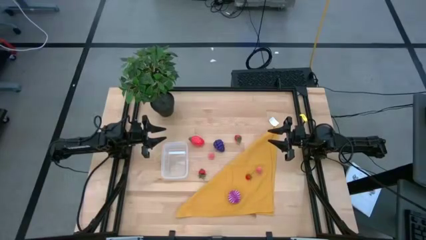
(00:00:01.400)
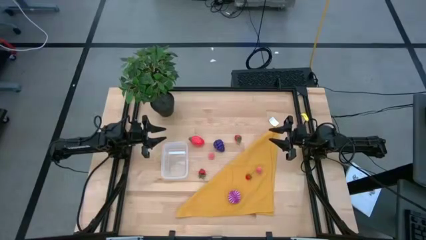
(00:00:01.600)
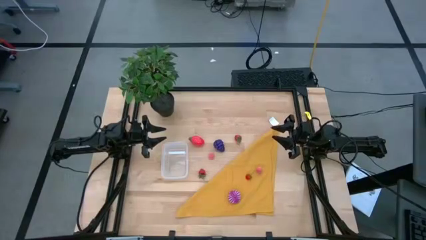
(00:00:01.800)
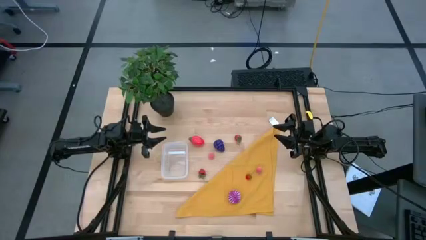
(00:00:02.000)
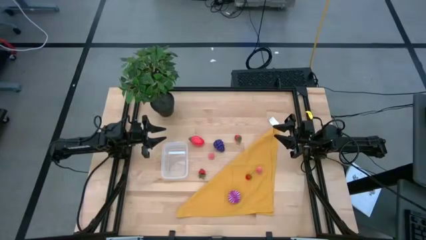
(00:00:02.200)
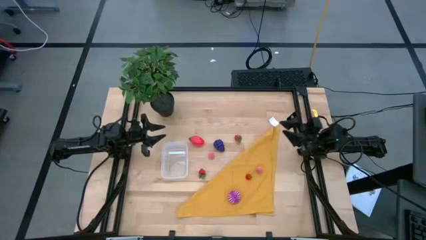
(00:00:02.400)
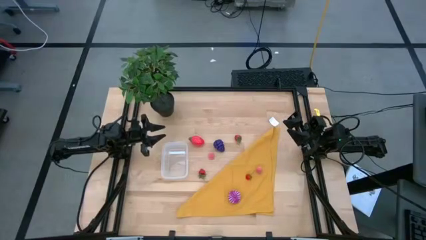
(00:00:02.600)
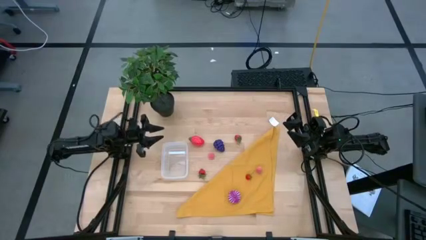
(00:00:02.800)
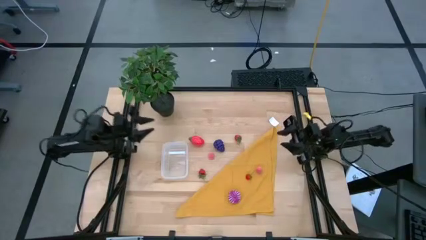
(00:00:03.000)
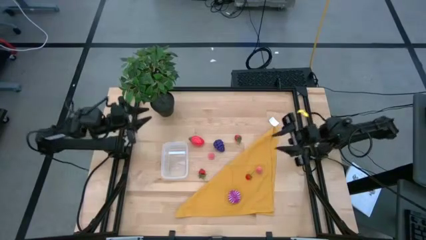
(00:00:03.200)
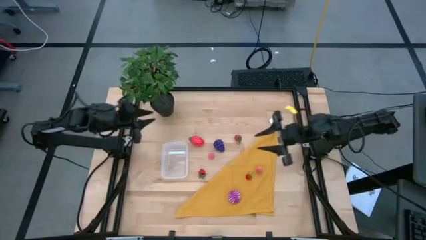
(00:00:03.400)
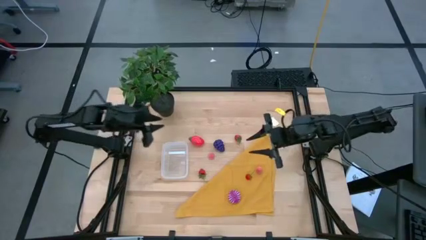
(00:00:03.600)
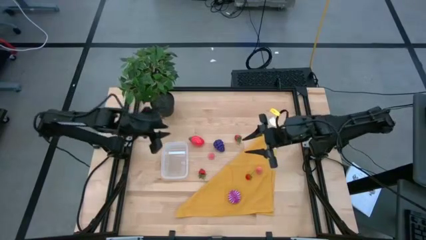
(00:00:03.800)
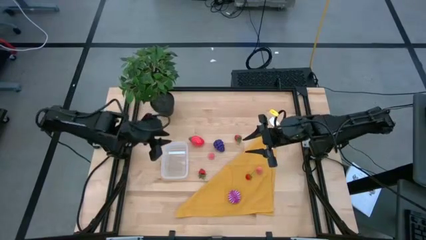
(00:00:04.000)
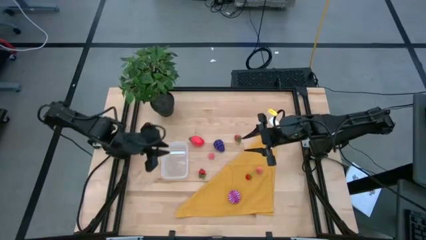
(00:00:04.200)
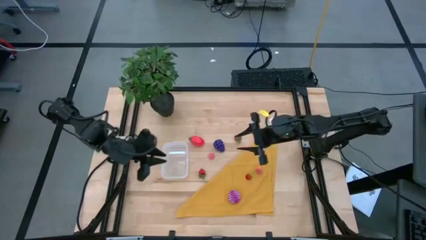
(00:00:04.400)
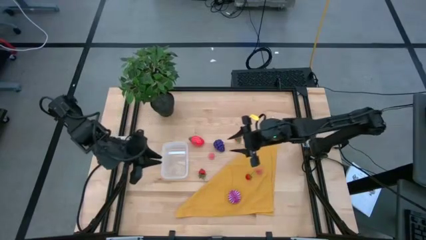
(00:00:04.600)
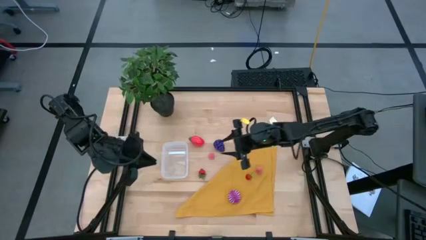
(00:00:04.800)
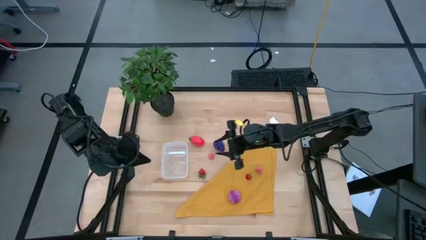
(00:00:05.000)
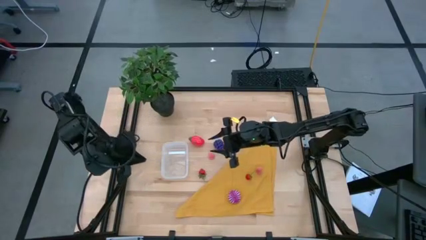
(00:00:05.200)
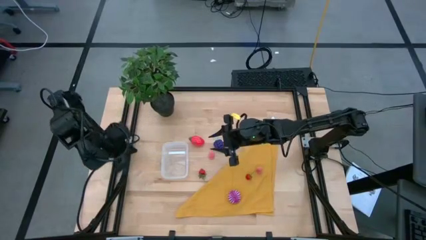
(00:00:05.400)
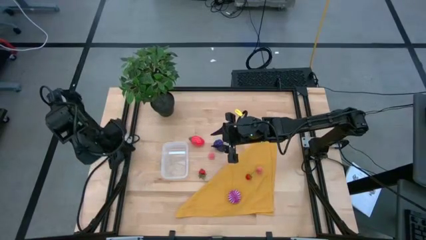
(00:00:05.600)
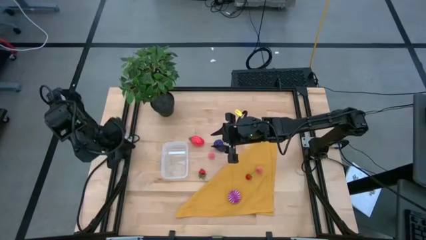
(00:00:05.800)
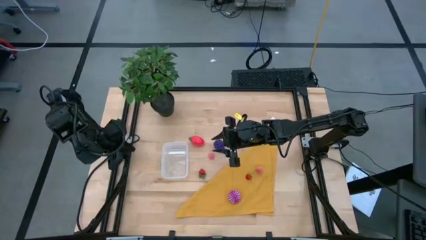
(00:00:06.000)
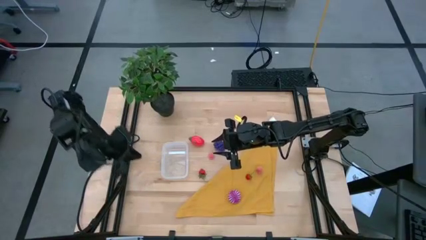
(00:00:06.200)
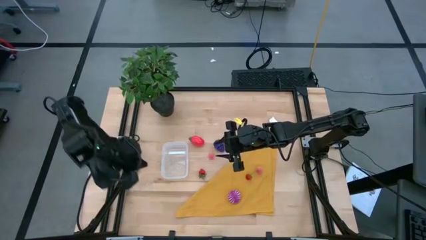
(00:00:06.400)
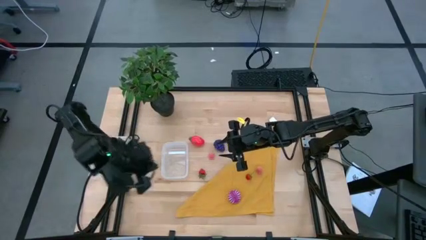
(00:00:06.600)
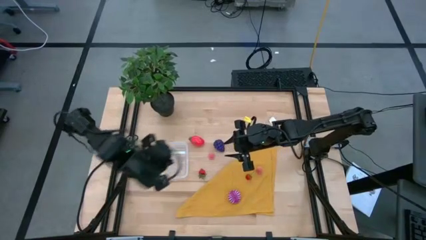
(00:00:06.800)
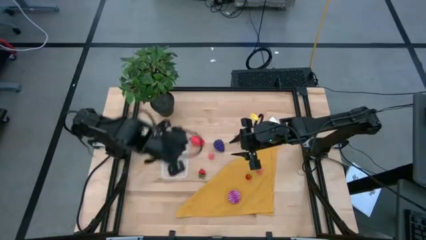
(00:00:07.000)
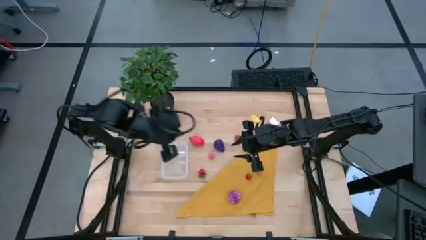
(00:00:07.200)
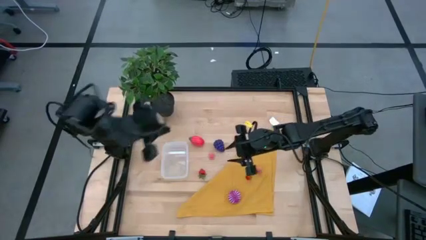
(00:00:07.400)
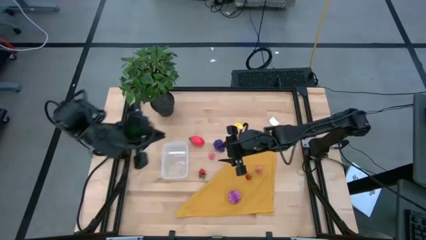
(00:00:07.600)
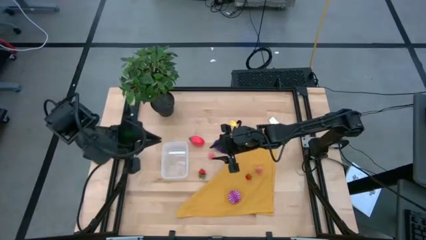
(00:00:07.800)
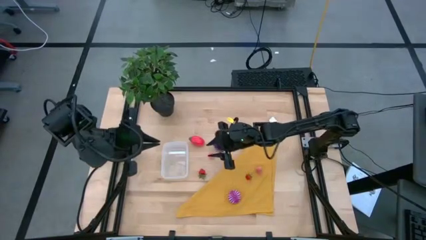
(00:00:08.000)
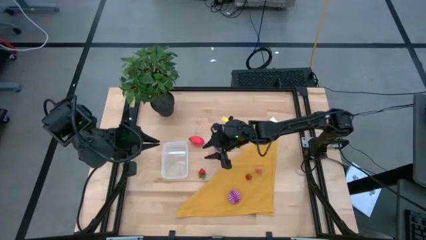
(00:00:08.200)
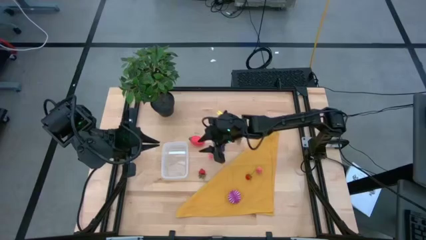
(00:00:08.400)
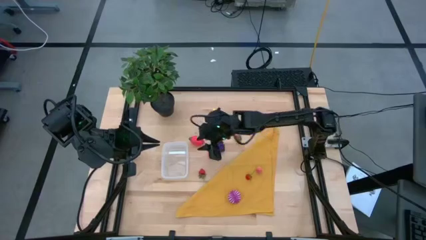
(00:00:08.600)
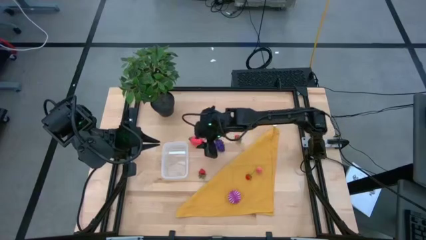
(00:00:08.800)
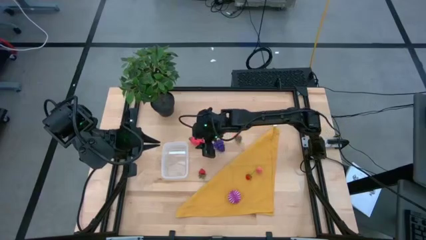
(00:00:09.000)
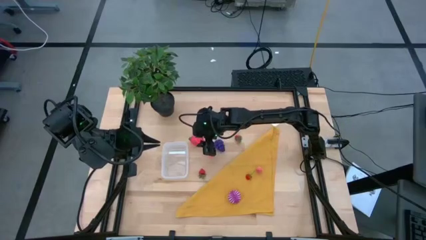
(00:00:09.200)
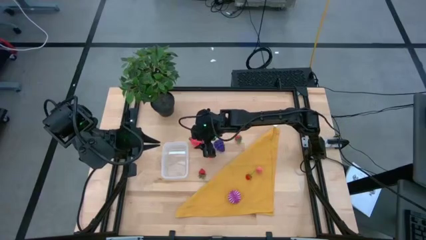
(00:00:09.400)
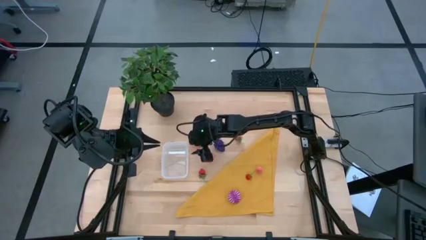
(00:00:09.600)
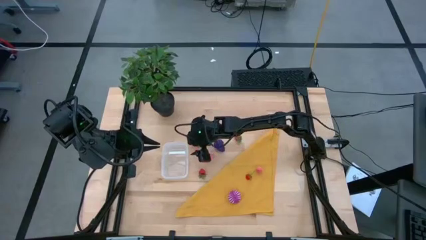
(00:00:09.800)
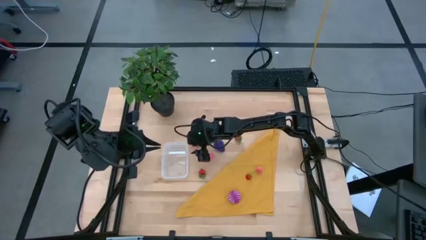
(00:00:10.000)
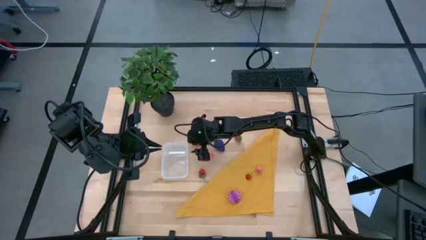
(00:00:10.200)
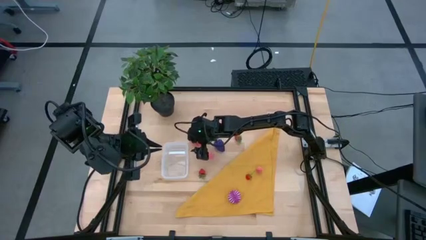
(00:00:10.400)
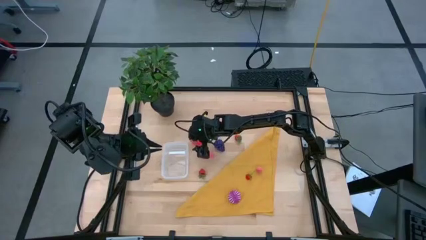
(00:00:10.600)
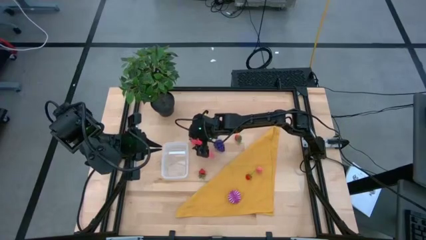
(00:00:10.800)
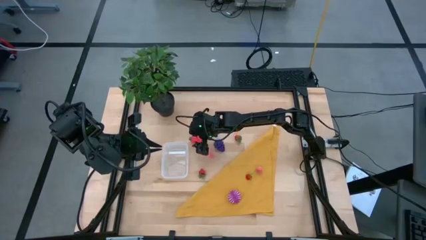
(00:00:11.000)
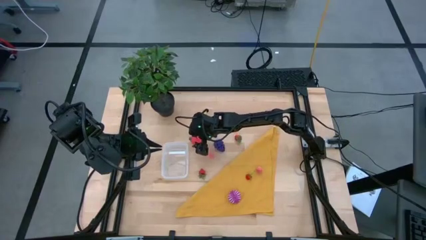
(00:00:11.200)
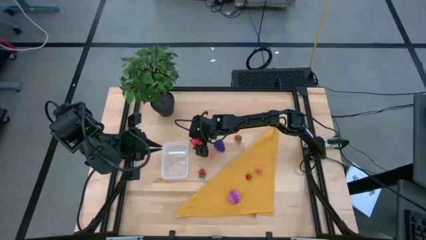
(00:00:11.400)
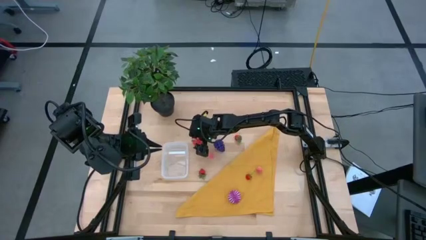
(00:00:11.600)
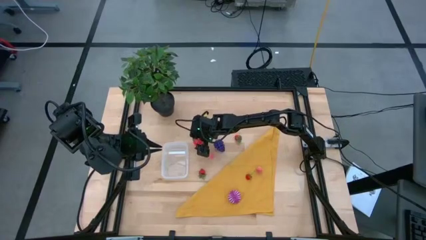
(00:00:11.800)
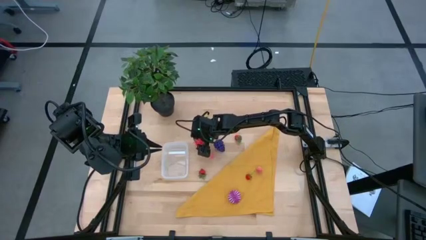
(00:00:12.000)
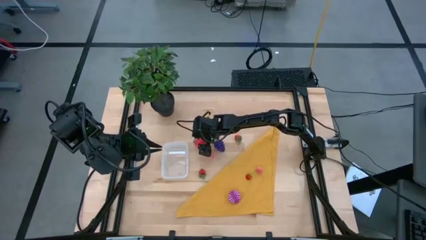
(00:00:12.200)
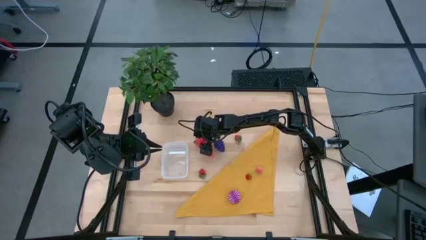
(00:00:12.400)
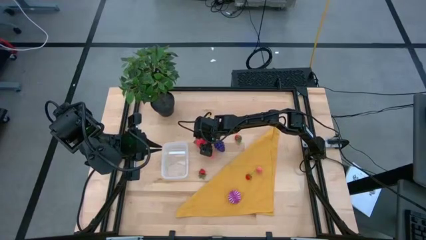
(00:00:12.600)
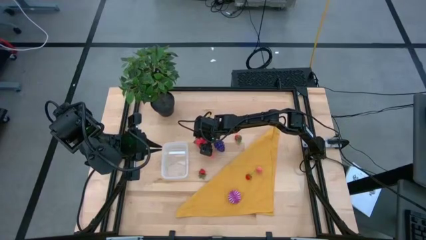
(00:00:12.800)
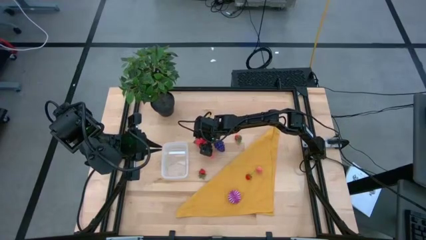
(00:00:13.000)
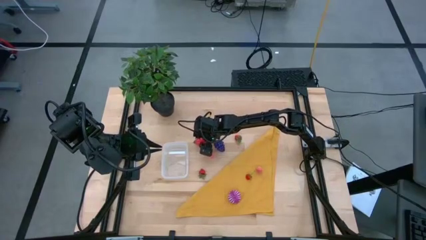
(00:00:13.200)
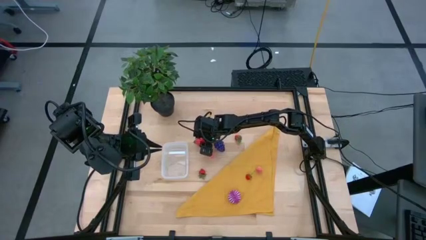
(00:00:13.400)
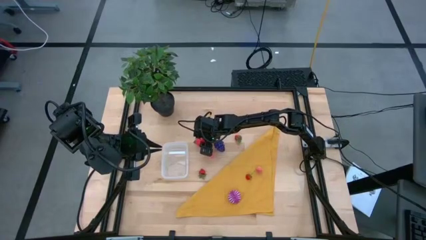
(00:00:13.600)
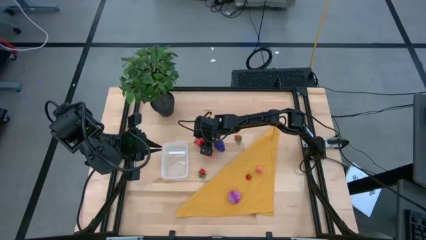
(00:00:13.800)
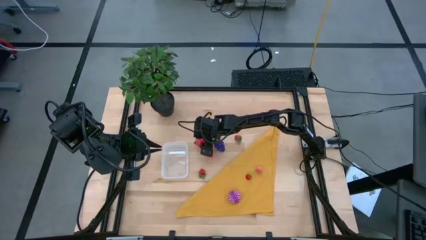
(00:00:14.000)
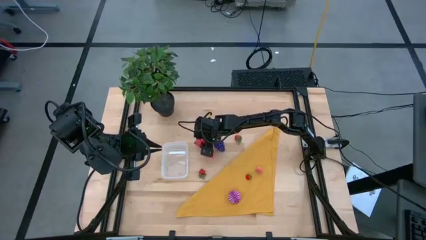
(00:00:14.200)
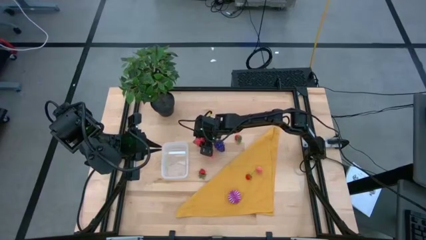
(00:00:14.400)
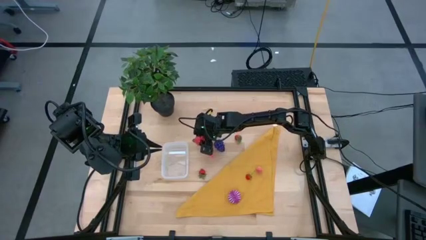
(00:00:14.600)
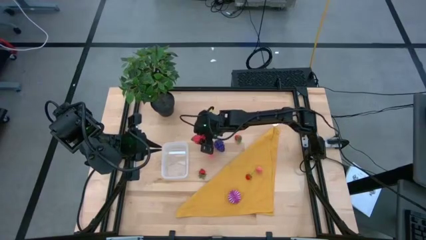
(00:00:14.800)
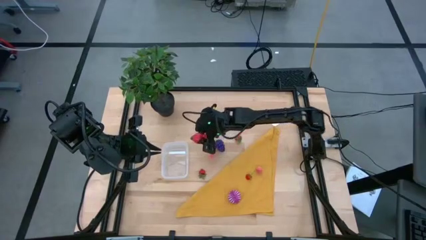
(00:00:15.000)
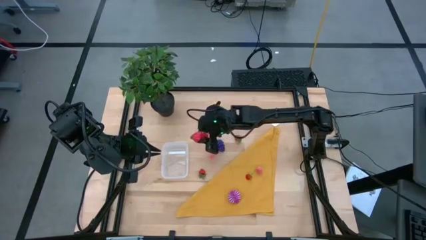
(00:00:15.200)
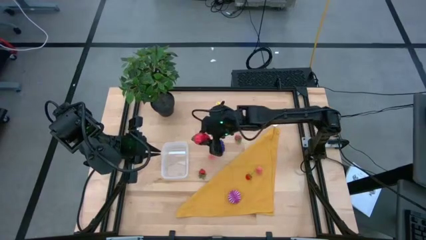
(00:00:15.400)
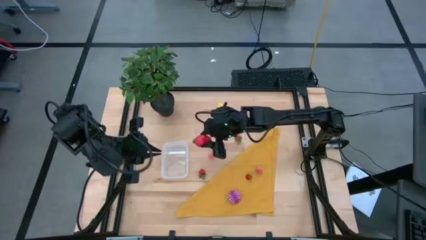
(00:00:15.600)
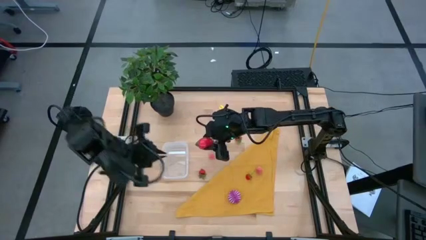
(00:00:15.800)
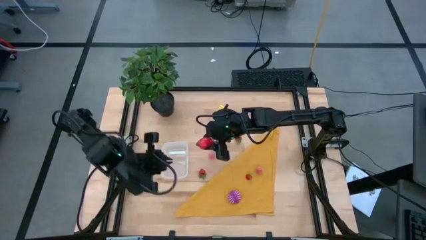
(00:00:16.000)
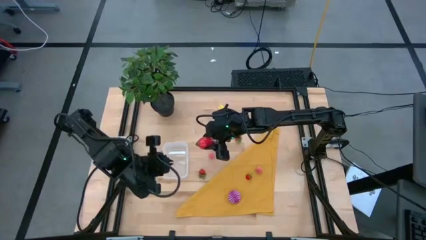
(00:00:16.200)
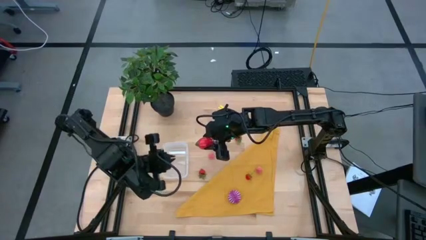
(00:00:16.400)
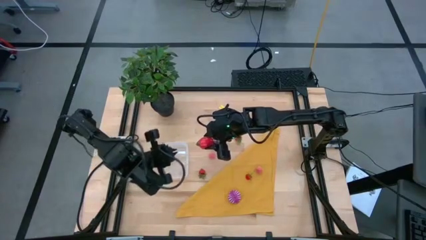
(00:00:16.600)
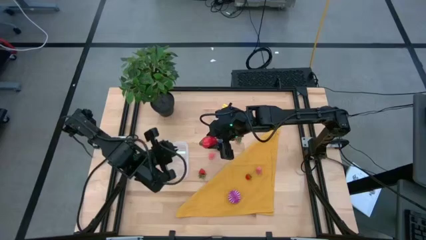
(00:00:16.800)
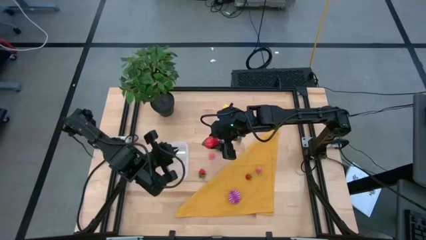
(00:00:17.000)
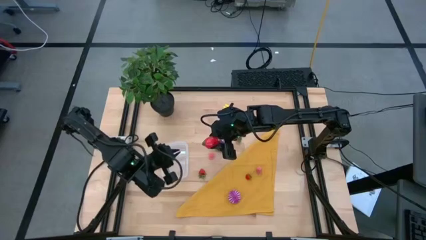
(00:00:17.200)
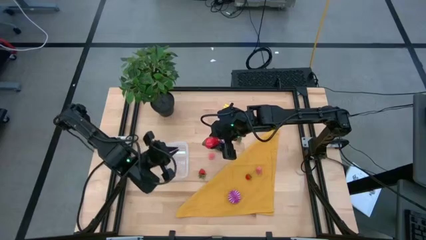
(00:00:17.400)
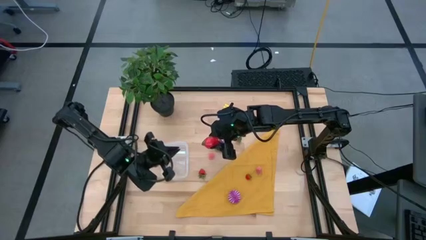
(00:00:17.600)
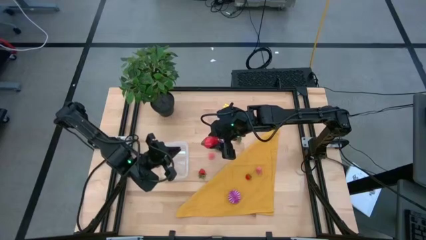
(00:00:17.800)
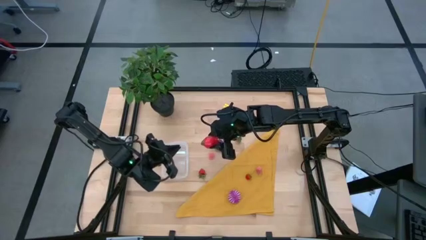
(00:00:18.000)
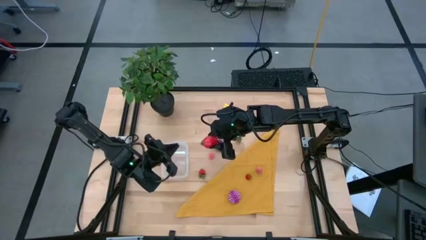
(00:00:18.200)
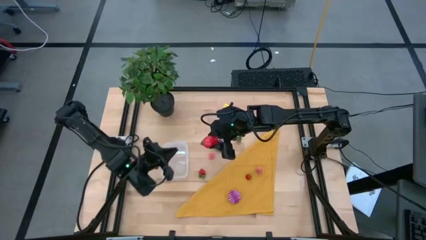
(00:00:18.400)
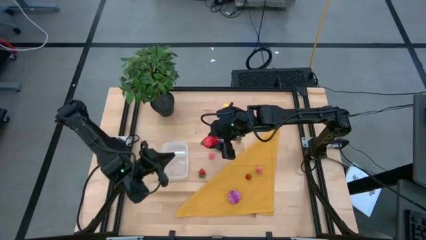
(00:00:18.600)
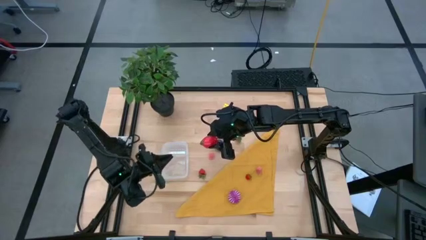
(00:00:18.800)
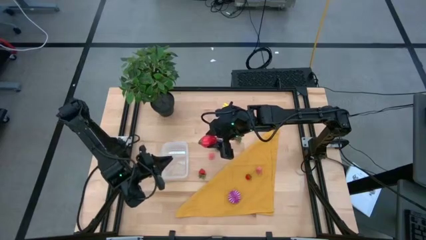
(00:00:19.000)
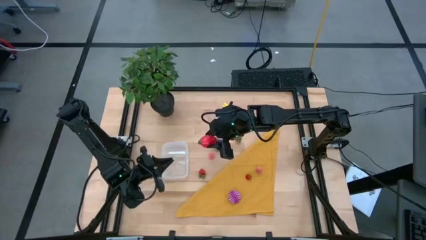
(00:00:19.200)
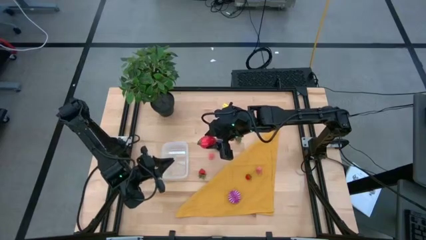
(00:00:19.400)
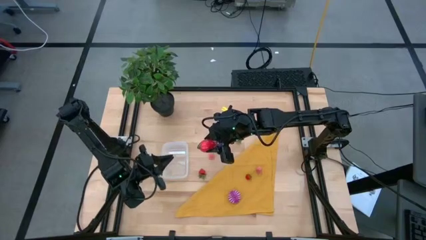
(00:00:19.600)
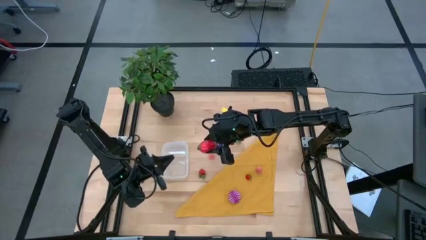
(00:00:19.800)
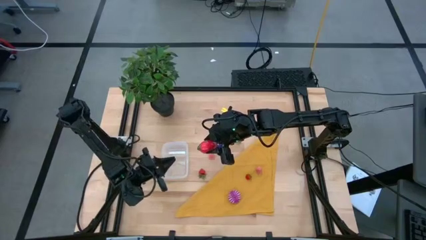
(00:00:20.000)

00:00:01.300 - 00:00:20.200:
Task: Pick and placing Produce into tupperware
Put the pink dragon fruit into the transparent bin
